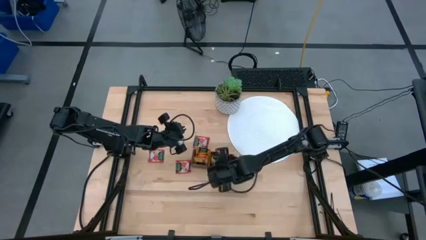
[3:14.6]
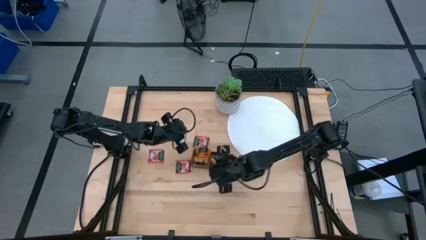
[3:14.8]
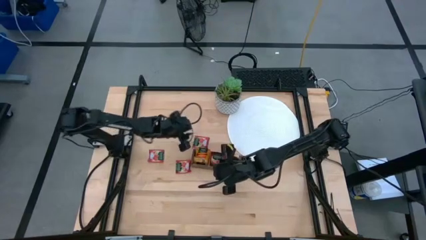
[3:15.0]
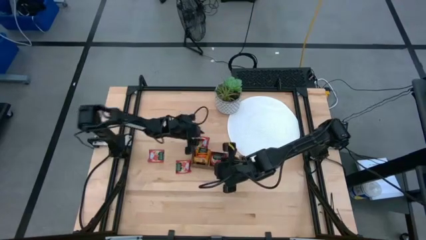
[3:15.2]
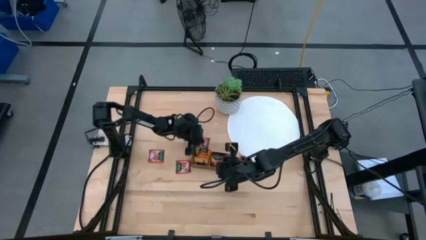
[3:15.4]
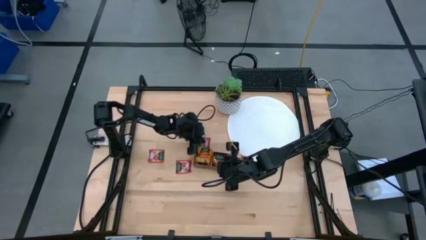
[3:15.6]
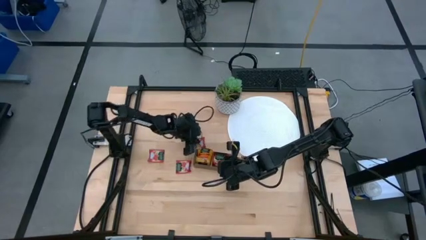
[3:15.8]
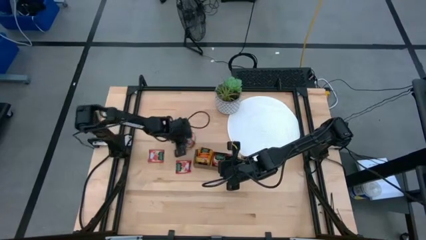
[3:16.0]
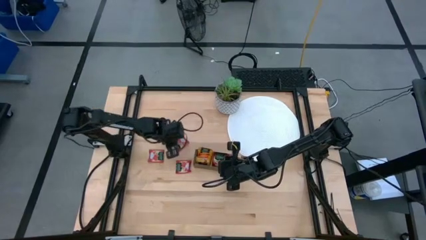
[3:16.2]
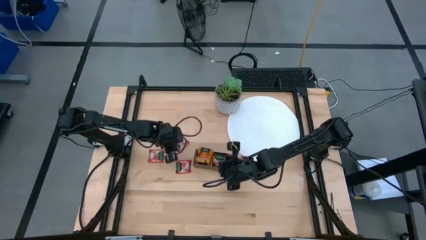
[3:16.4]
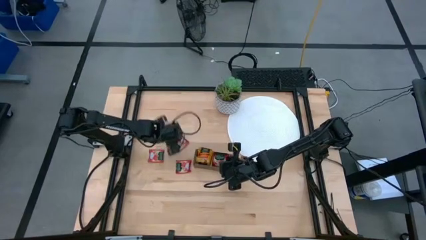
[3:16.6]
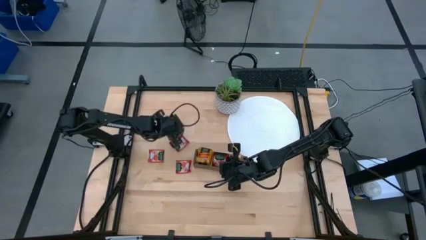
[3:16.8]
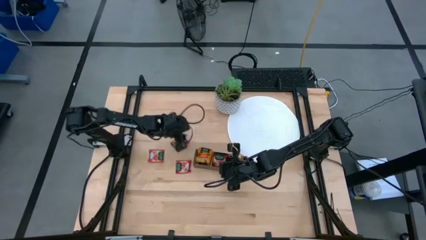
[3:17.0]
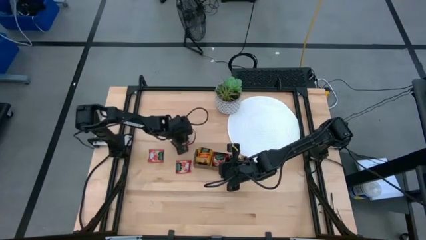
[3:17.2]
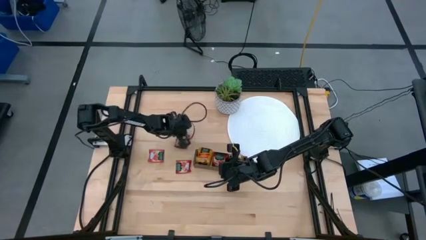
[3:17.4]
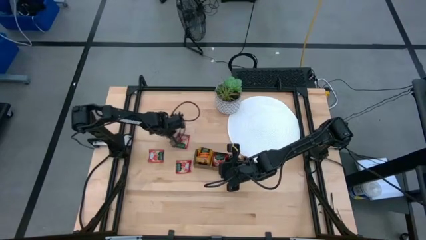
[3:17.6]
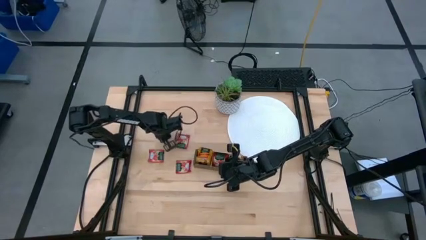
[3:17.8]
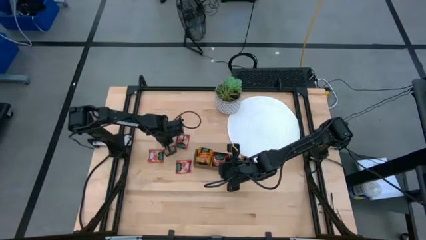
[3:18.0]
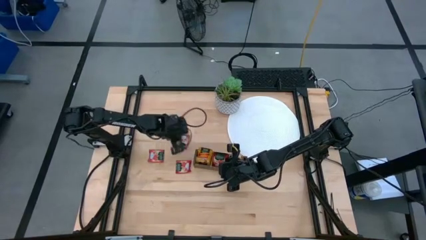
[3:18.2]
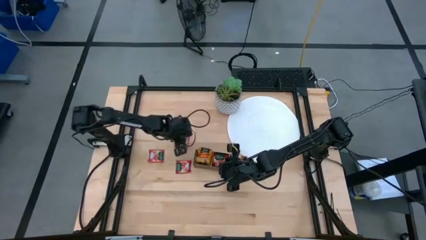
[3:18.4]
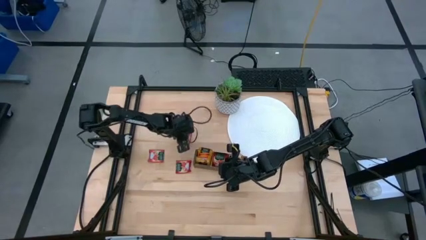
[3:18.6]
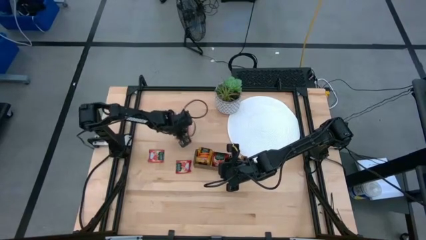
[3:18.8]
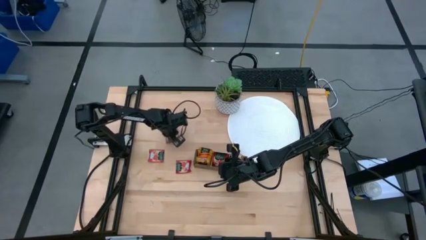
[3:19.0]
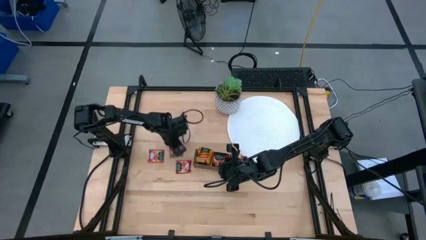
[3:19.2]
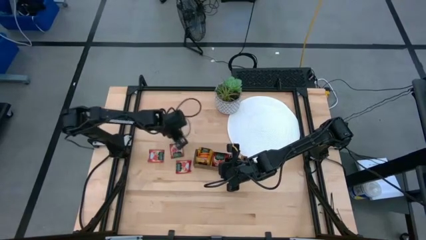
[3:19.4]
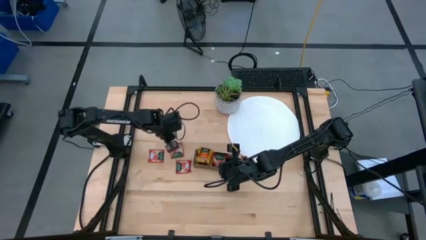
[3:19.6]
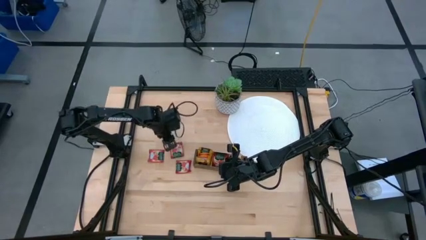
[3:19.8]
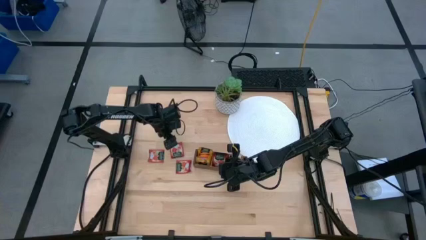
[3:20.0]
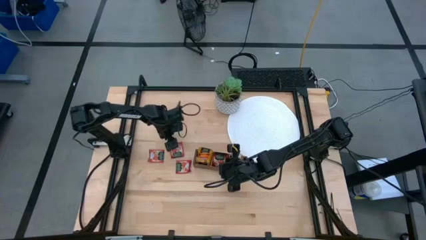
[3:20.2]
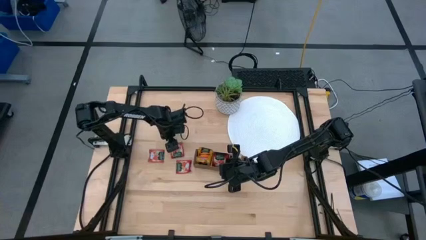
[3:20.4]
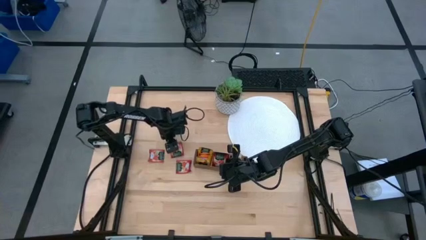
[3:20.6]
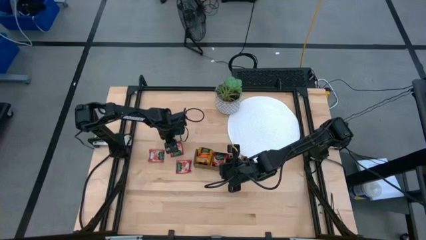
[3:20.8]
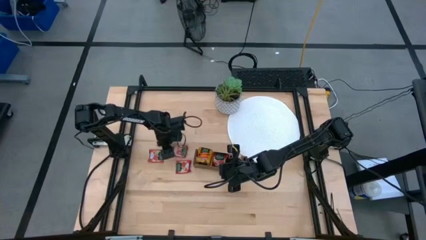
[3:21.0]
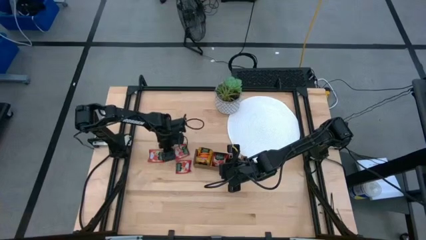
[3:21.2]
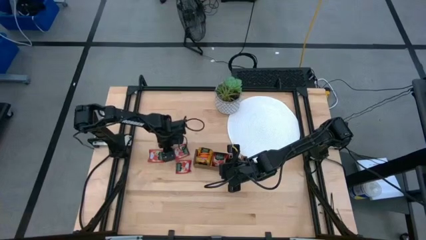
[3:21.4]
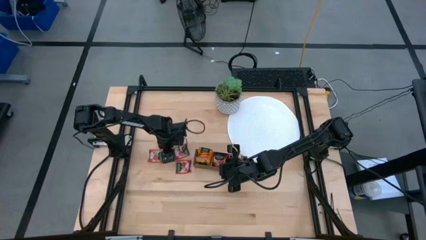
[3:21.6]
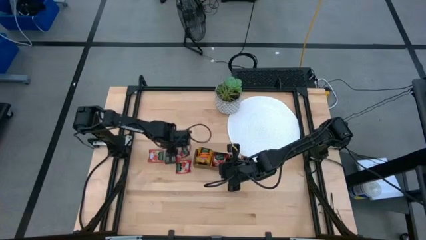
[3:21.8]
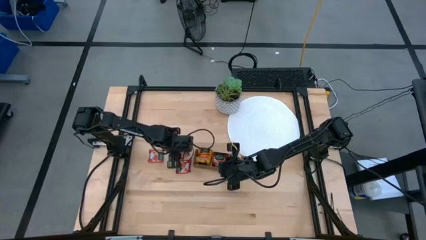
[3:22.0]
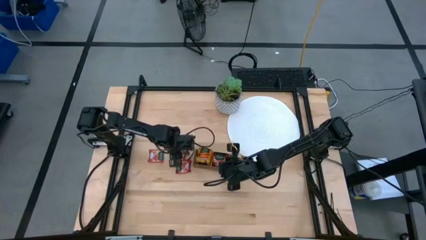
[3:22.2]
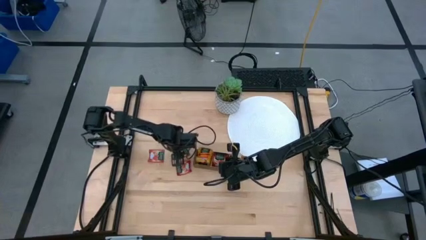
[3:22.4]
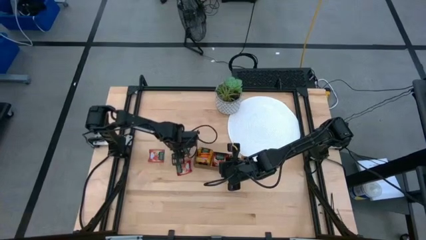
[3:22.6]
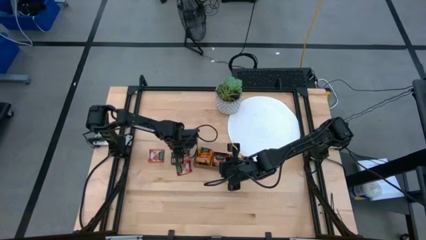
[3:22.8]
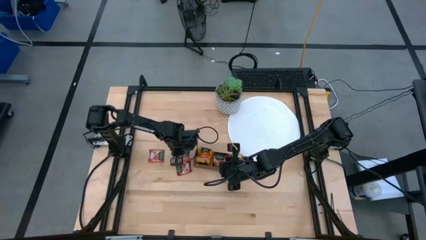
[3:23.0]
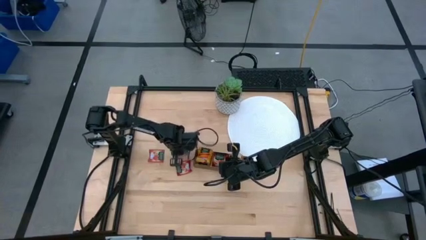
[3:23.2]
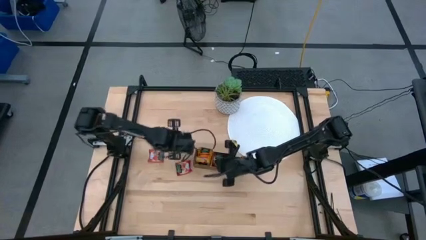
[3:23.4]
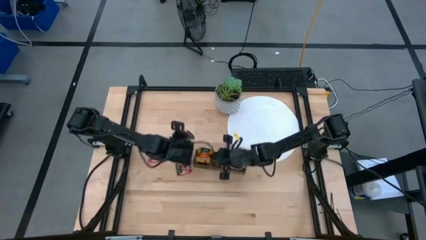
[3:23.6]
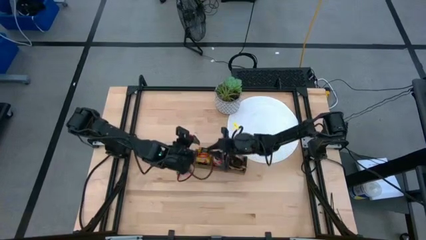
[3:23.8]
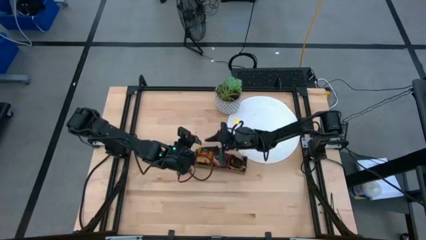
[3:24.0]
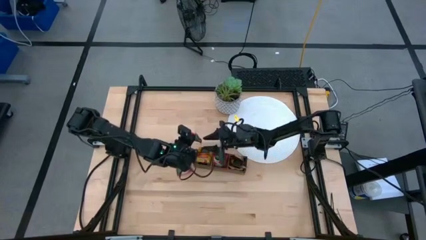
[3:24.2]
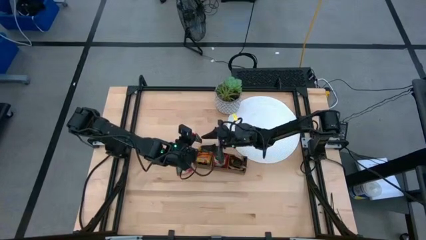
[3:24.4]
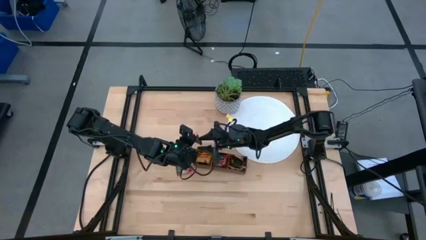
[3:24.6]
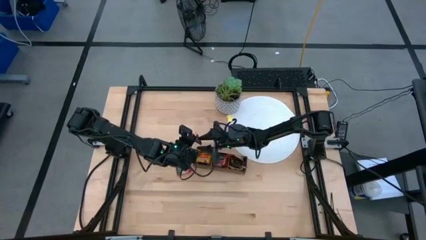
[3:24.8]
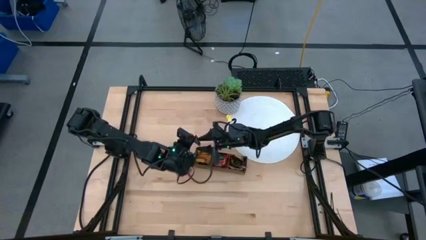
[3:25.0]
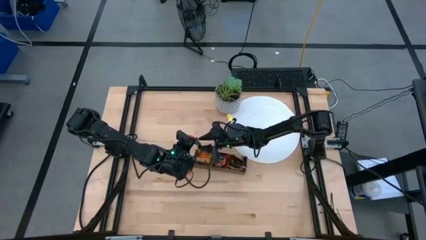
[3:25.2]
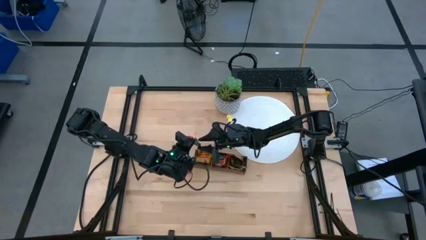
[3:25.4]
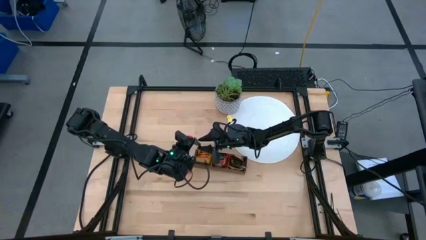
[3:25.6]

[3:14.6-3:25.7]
Task: Pick & Place Tea
Put the red tea bag into the middle section of the wooden organizer

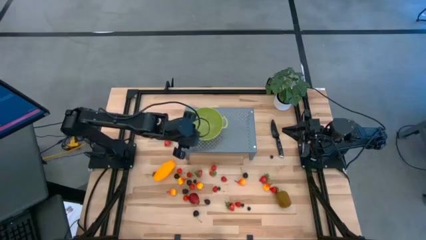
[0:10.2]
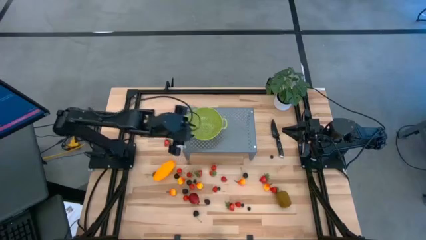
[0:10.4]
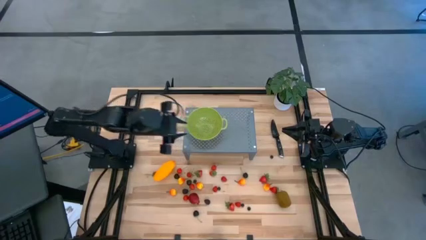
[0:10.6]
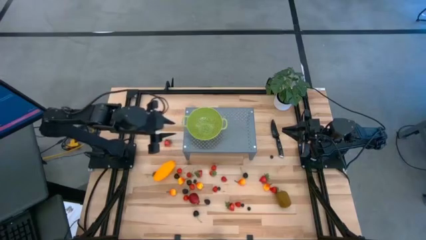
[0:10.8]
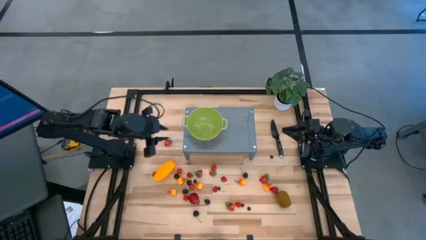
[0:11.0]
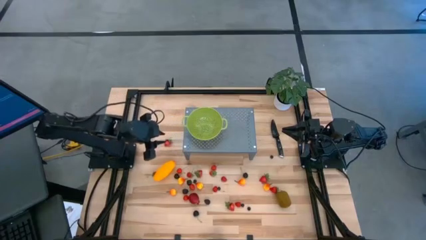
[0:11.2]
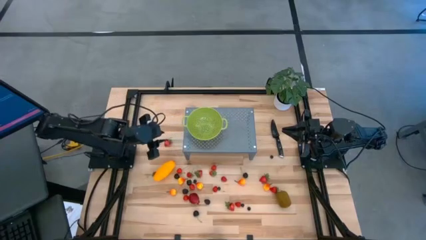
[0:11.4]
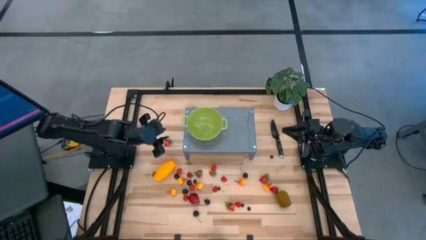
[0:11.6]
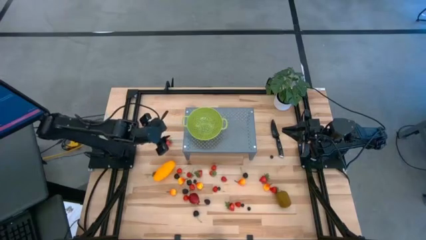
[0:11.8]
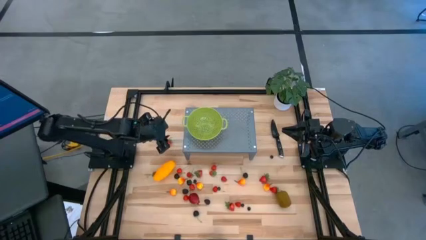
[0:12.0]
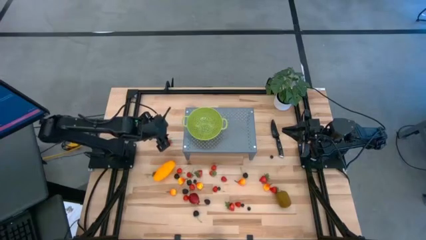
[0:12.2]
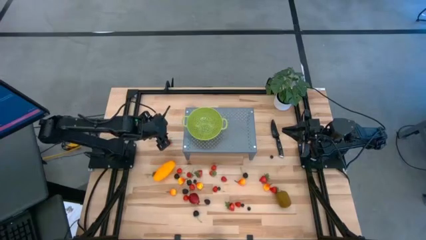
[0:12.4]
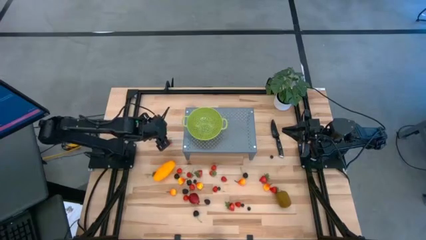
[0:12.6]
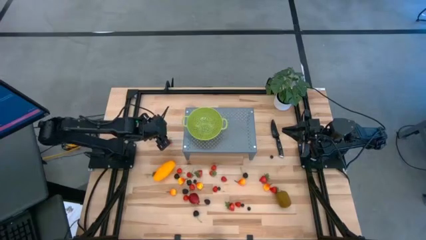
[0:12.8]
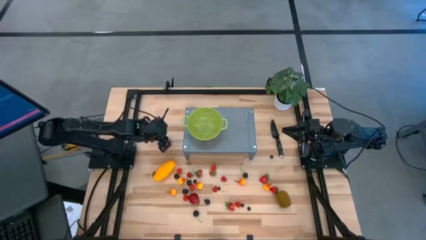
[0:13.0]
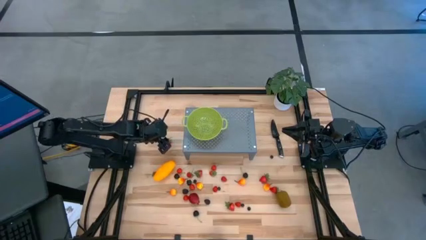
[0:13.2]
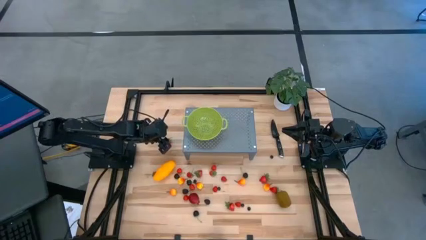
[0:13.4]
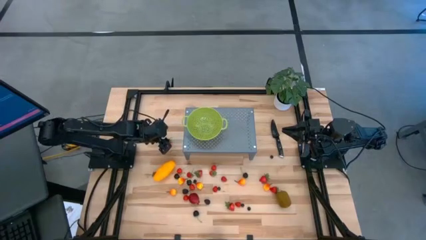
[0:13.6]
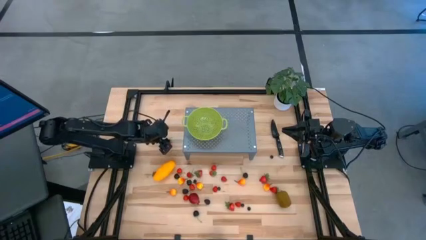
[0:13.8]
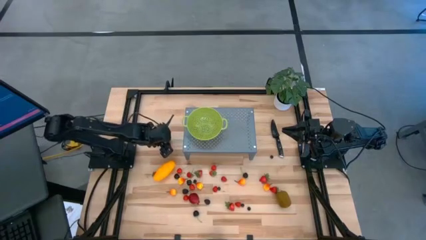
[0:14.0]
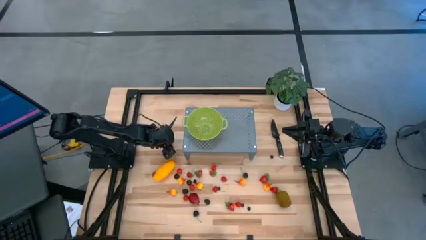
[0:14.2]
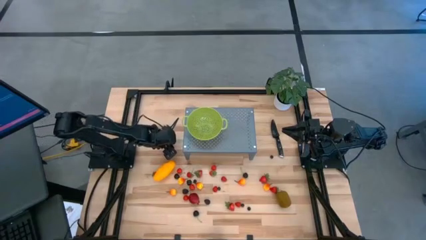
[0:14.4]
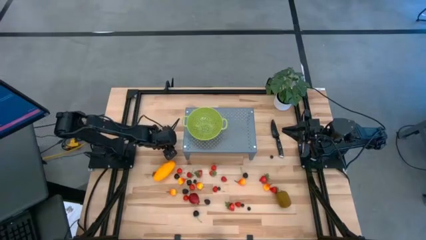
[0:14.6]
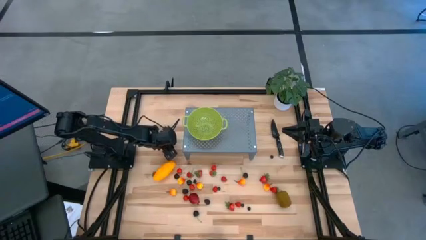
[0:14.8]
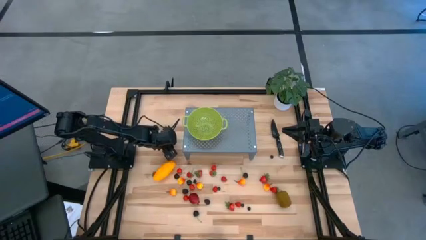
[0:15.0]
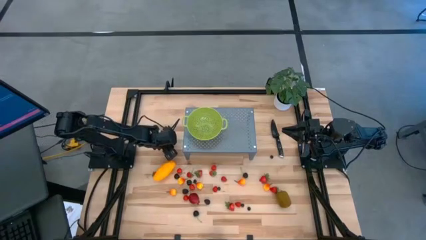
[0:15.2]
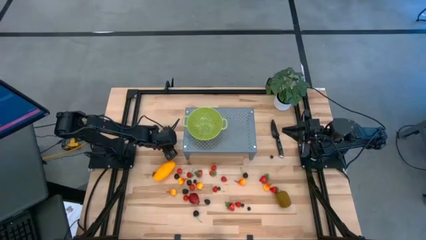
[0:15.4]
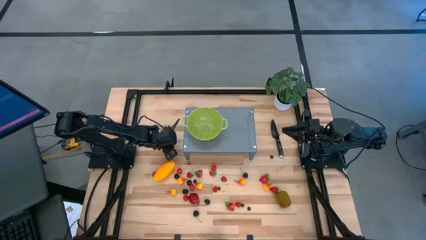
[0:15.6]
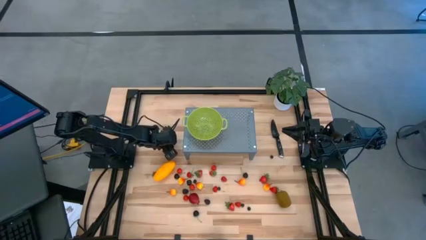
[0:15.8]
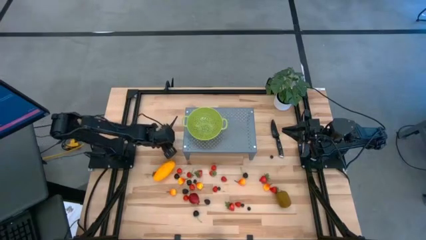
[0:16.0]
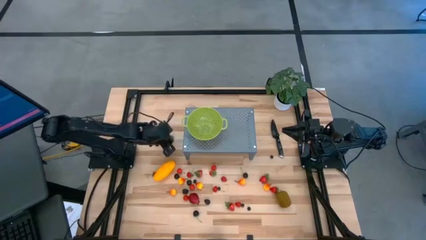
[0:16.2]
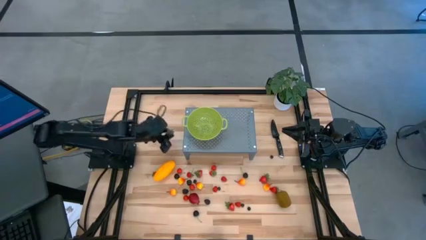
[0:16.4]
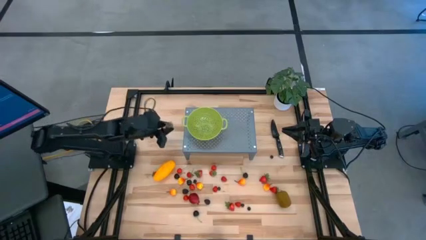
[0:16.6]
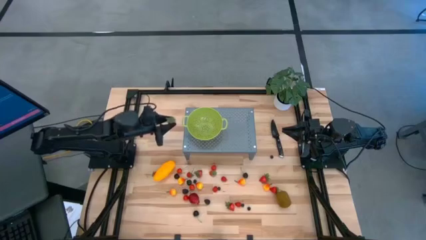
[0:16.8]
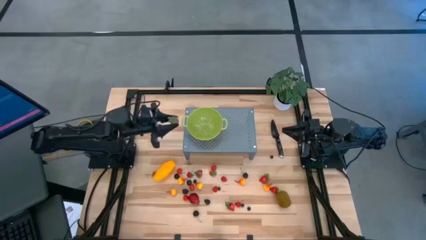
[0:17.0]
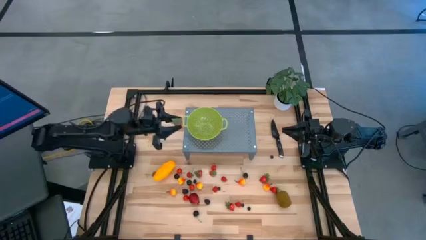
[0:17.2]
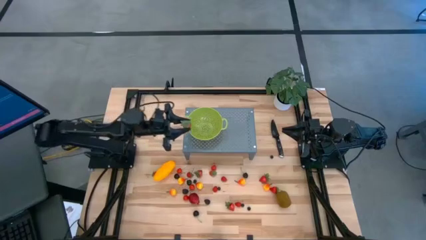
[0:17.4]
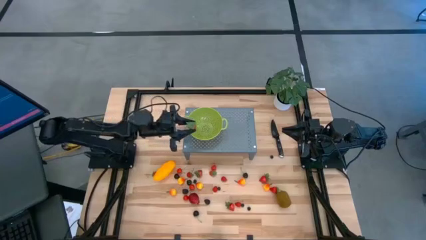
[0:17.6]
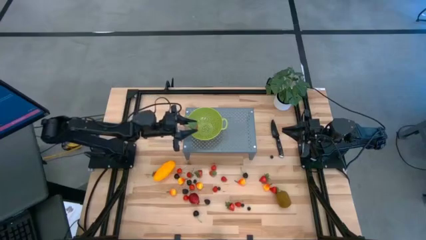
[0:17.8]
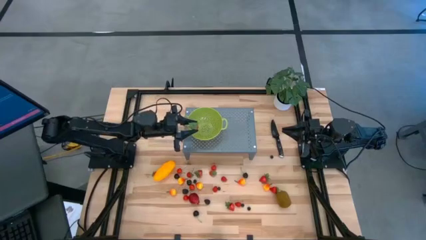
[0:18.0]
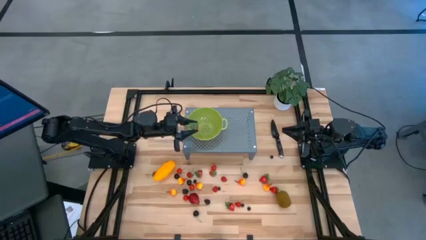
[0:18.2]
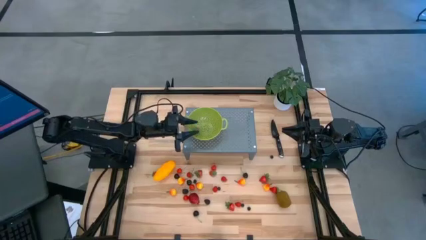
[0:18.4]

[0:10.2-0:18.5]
Task: Pick & Place Fruit
Put the strawberry into the green strainer bowl on the shelf
